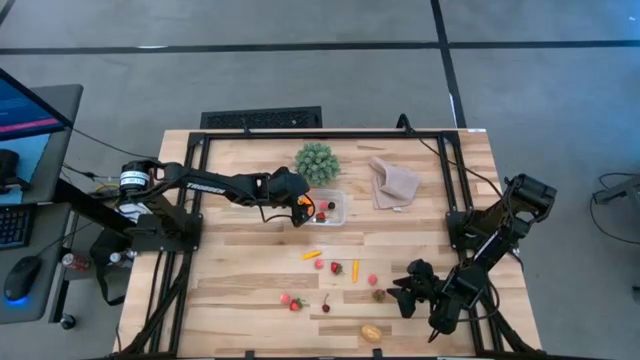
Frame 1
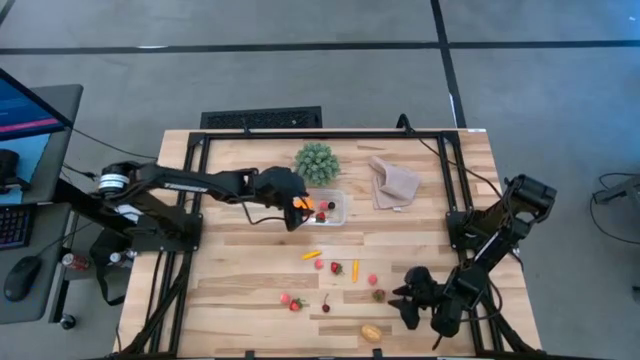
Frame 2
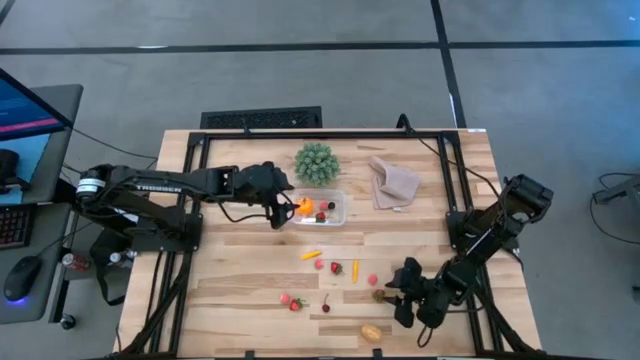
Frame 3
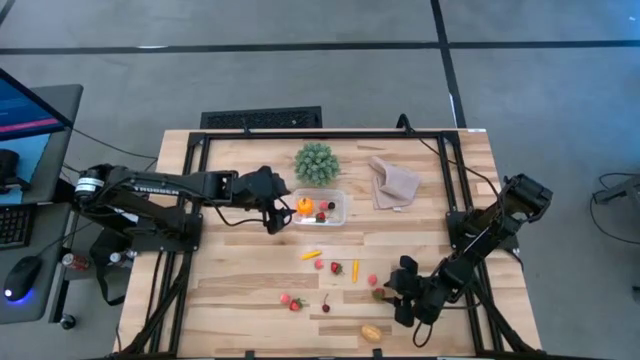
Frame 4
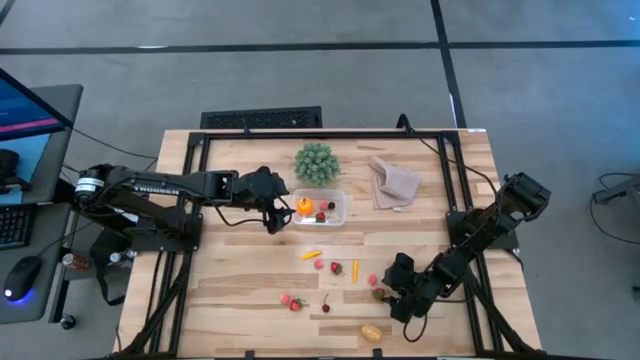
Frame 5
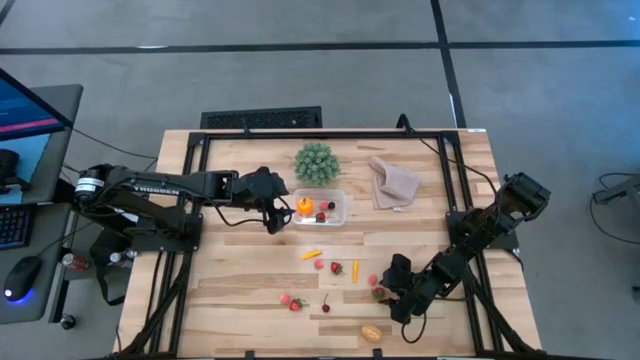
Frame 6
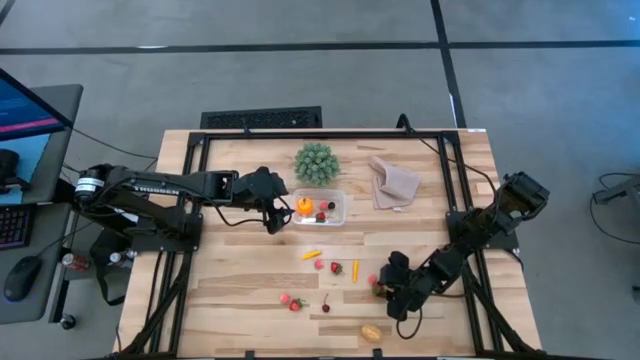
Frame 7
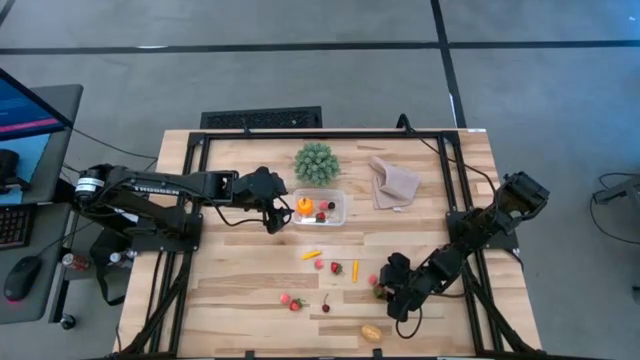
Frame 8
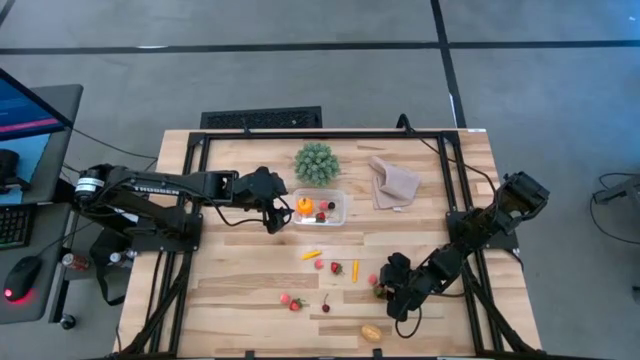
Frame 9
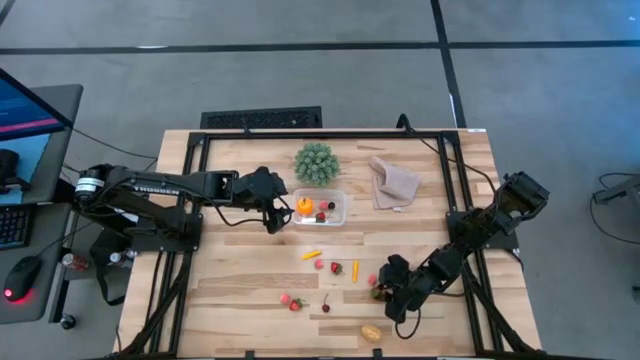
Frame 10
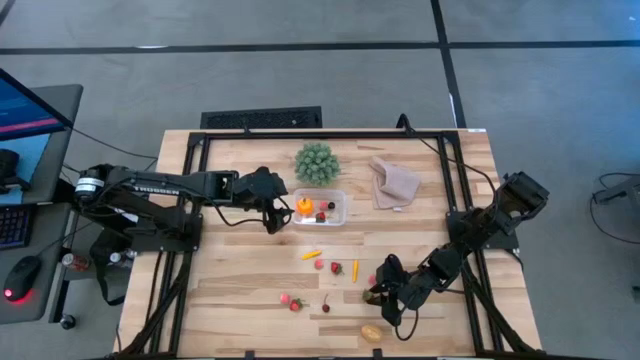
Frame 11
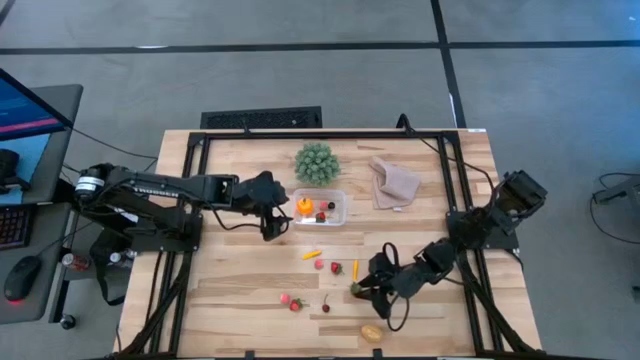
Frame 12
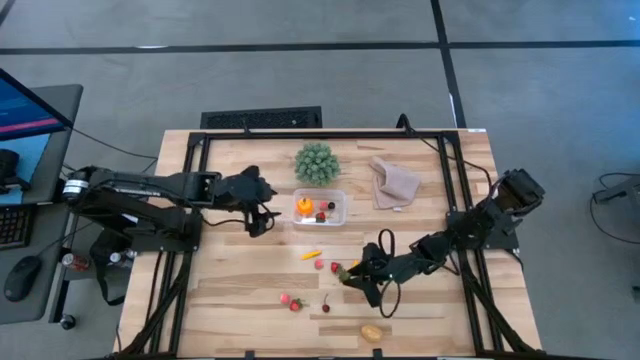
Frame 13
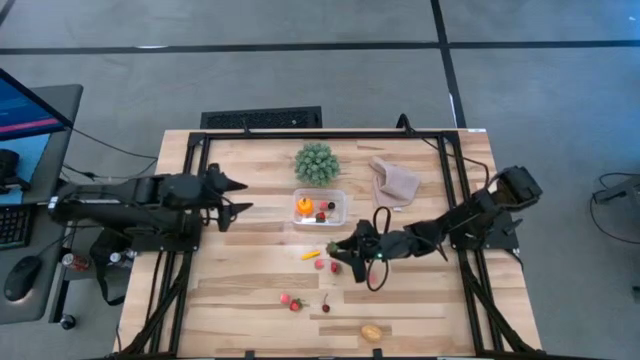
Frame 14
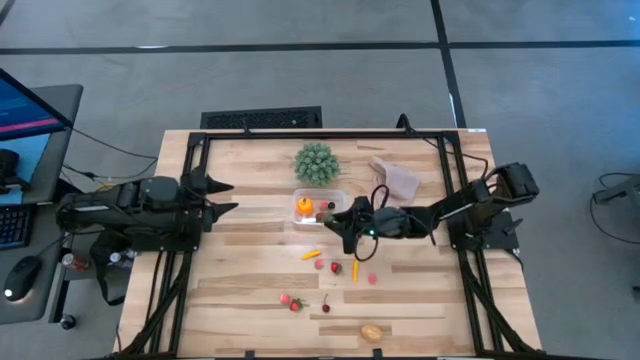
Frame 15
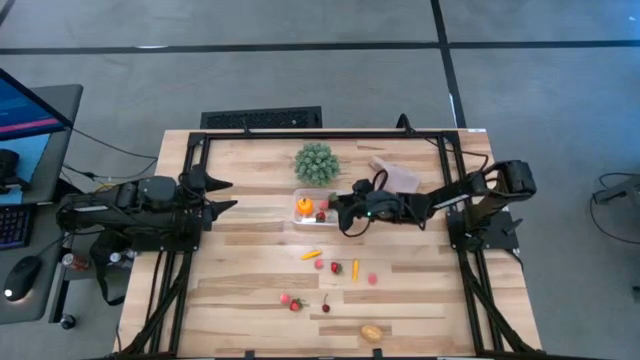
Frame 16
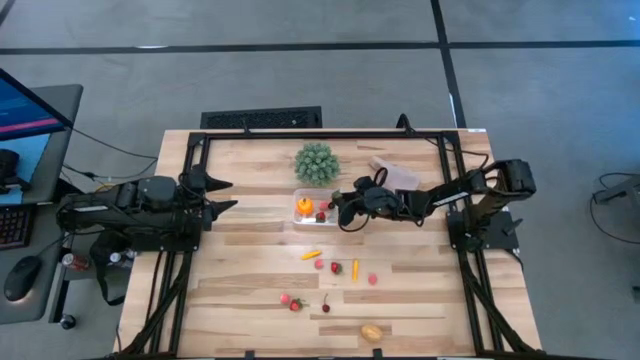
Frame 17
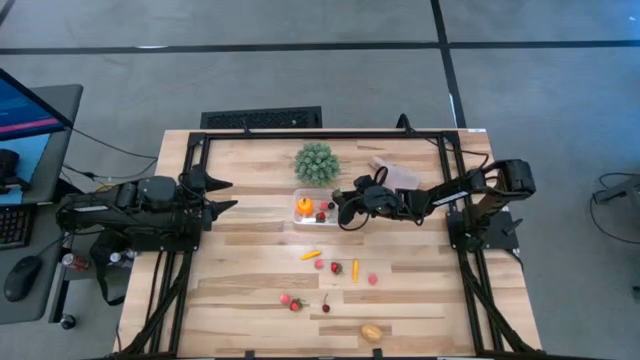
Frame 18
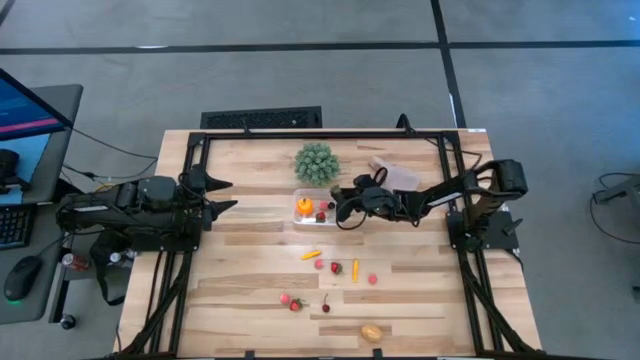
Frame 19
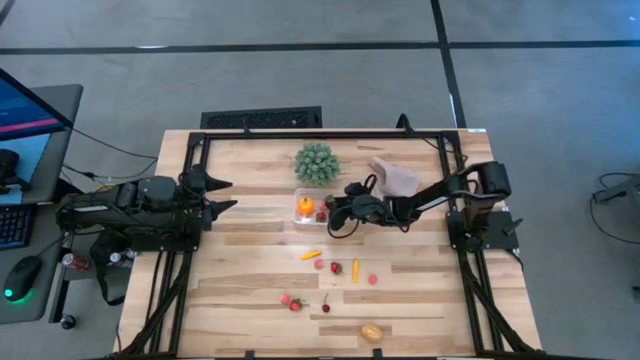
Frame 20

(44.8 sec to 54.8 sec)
Task: Pick and placing Produce into tupperware
Put the red strawberry into the transparent container

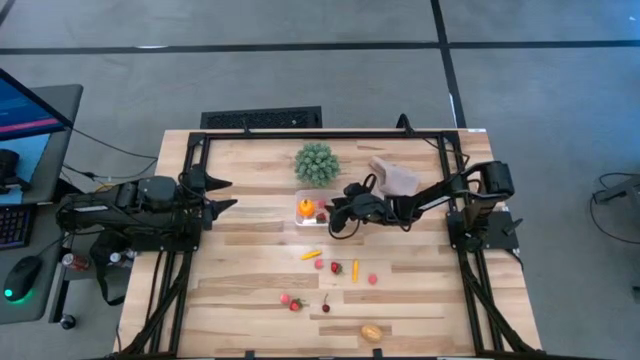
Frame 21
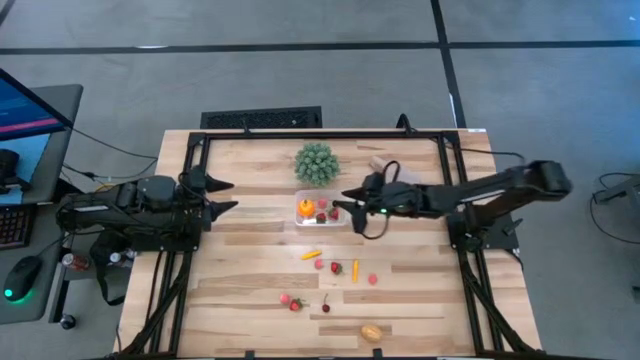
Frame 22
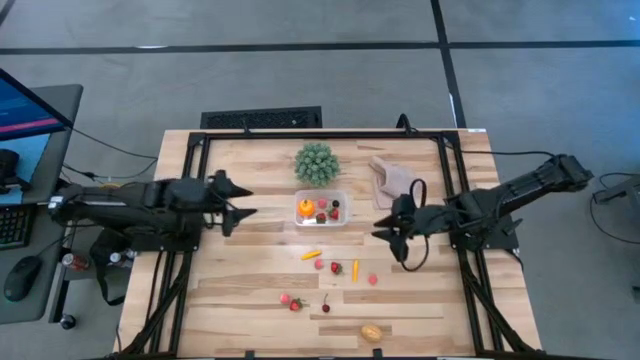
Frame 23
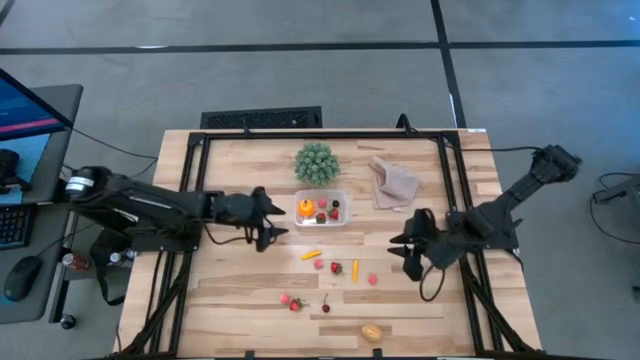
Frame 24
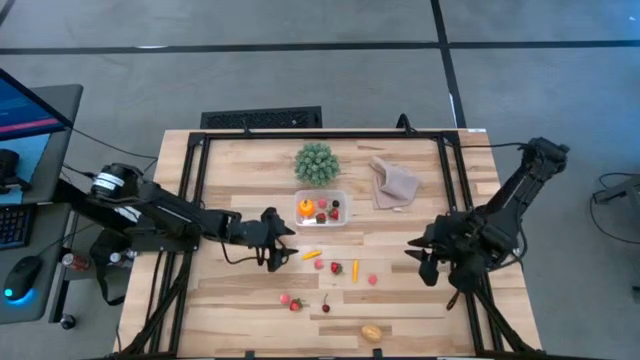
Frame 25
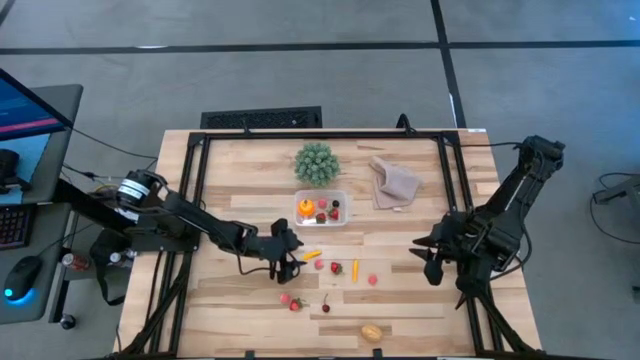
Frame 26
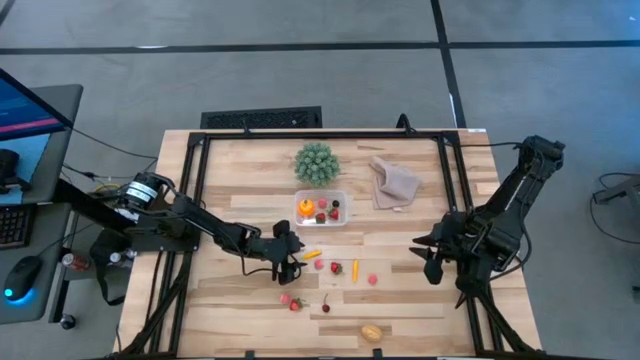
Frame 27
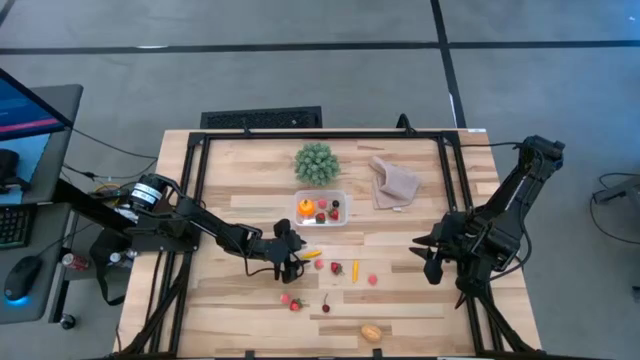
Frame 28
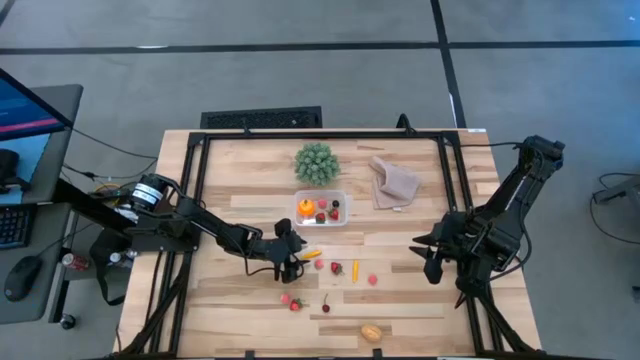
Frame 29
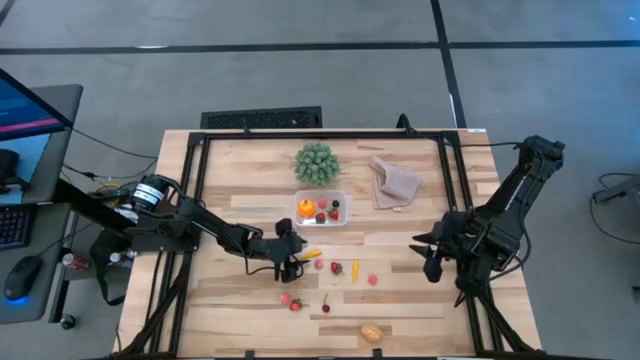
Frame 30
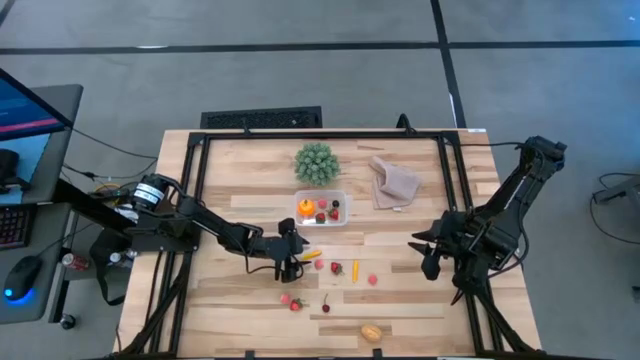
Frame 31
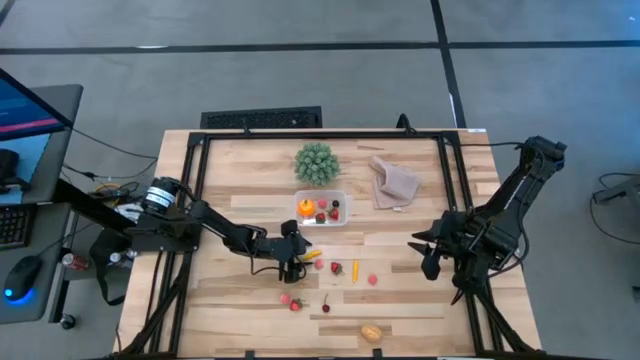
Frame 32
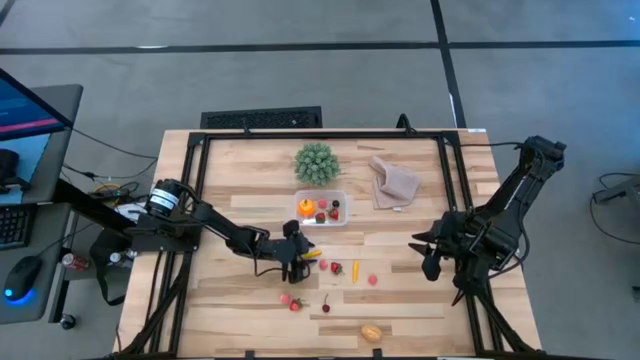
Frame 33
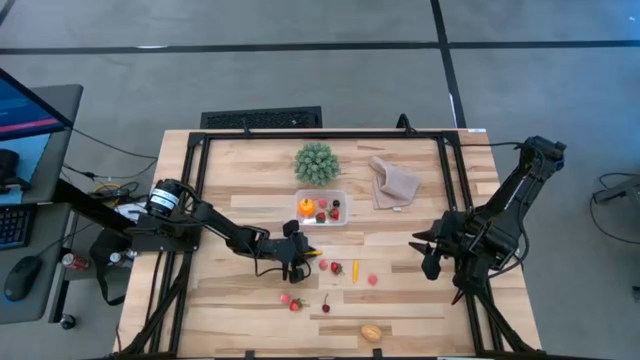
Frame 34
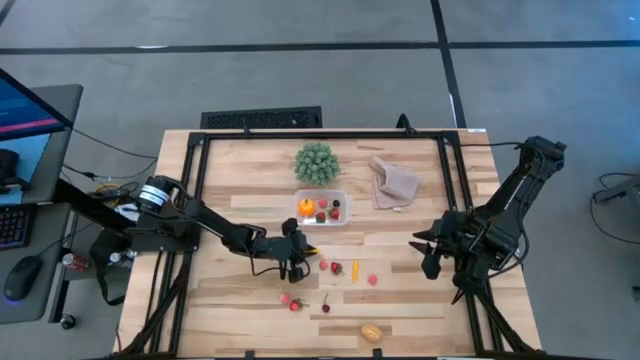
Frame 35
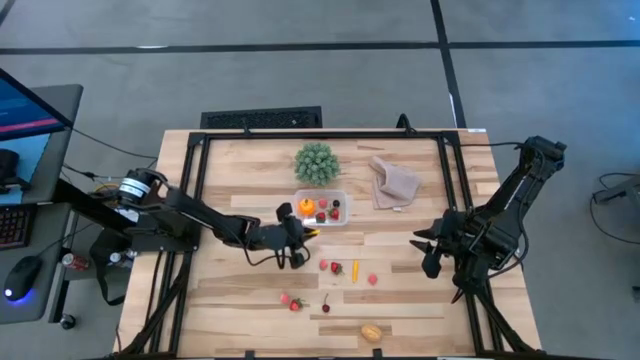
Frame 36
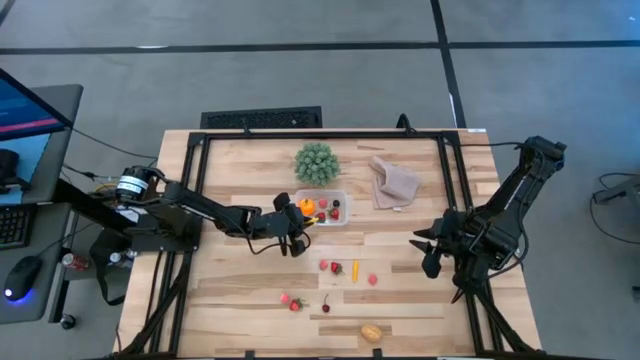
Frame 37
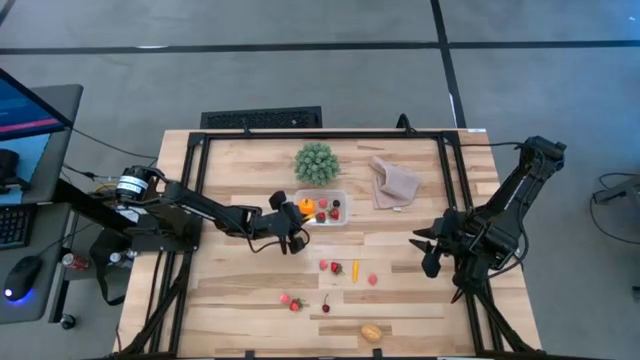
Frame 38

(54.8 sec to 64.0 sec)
Put the left yellow corn into the transparent container

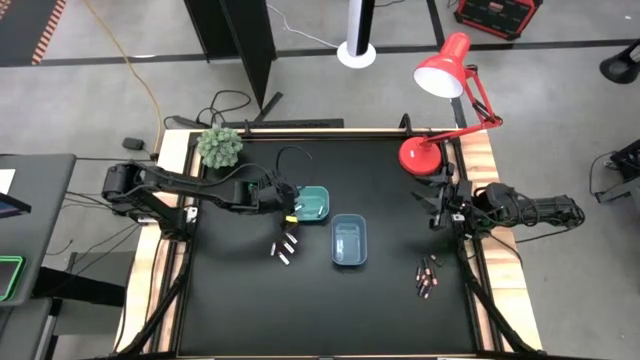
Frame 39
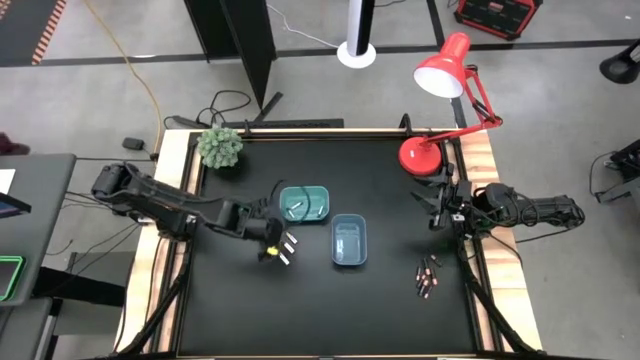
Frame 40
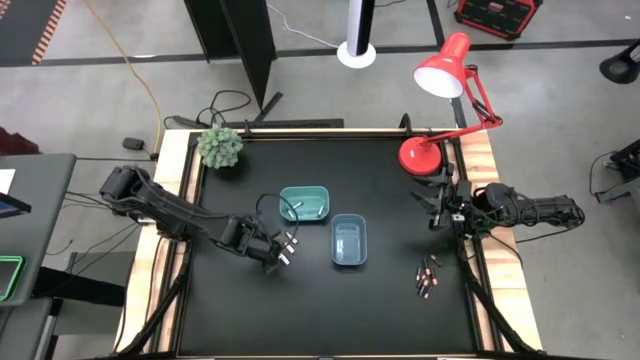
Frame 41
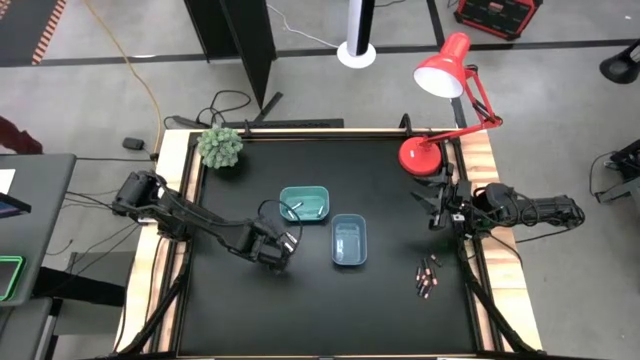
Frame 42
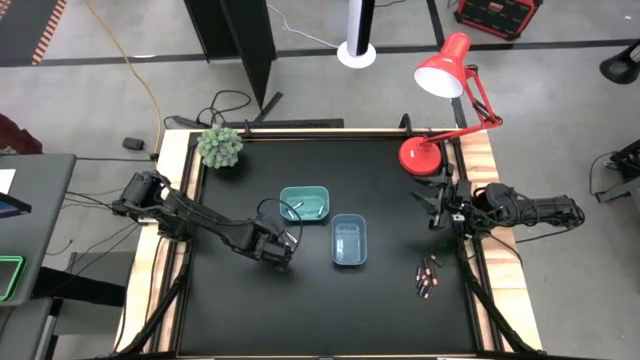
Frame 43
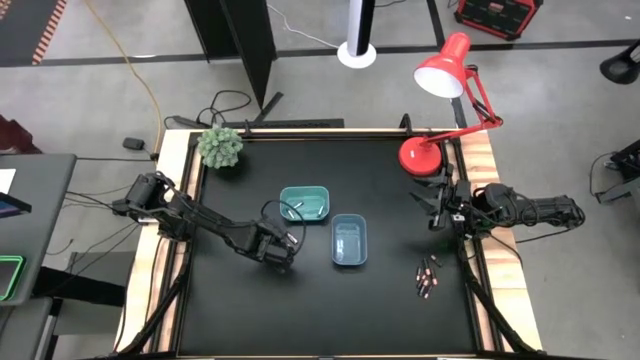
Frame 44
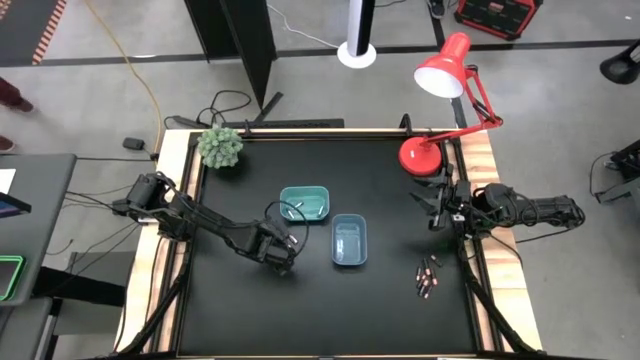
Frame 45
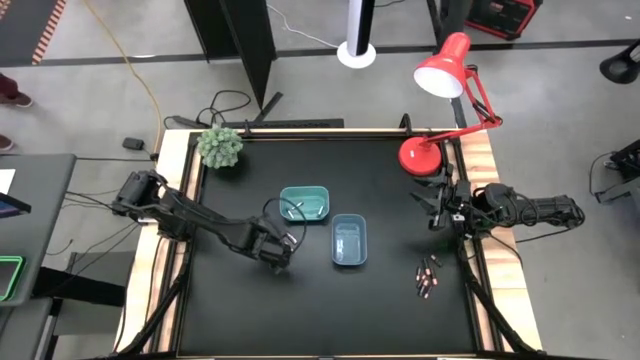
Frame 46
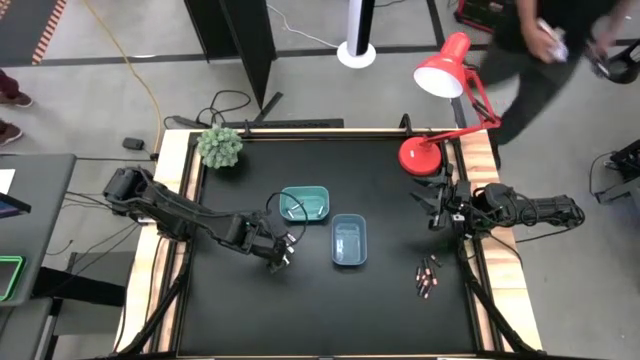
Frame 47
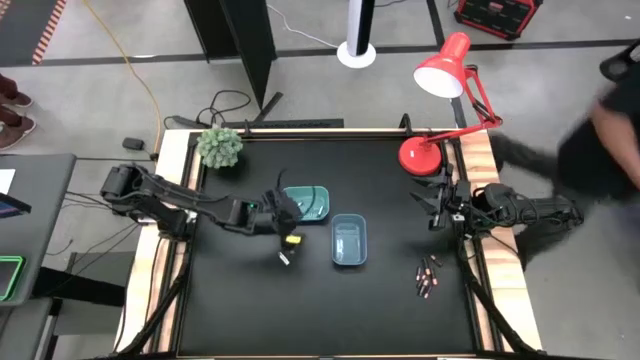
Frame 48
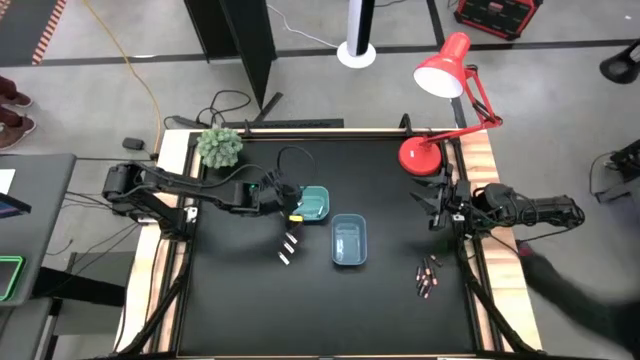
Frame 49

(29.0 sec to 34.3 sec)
Task: Sort batteries
Put the silver battery into the light blue bin
